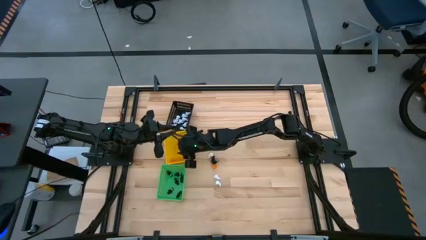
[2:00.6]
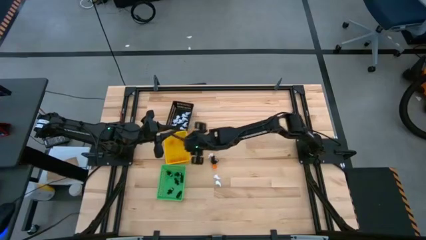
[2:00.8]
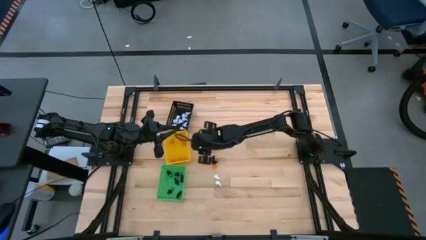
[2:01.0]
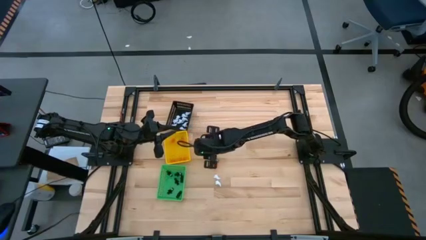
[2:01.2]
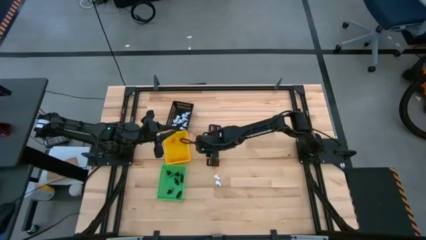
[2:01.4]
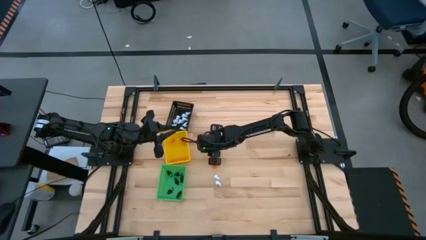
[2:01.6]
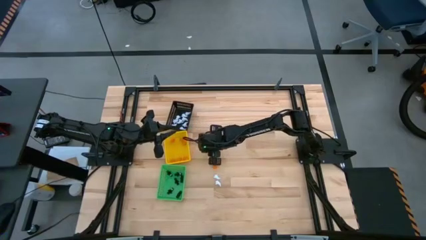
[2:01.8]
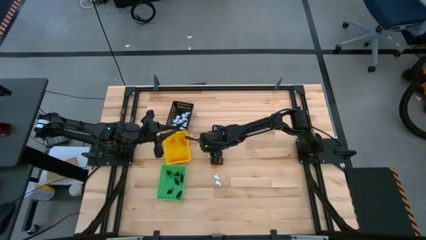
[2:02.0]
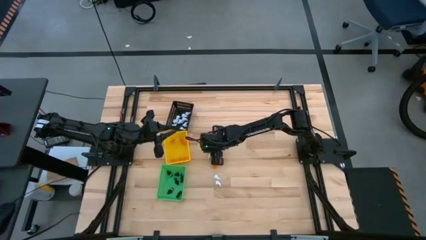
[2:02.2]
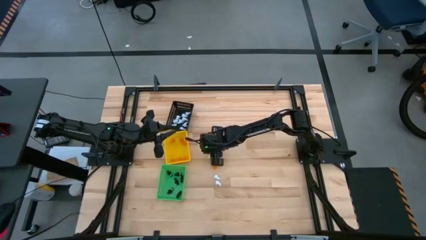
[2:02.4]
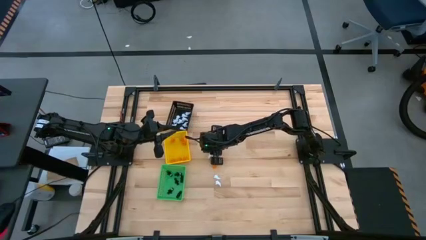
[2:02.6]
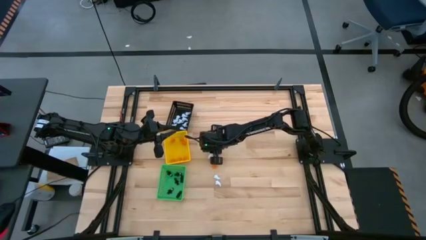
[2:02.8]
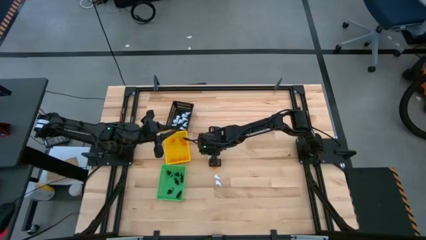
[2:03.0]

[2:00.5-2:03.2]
Task: Sort Halloween decoration
Put the orange pumpkin toy into the yellow basket

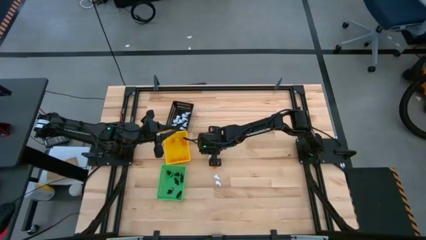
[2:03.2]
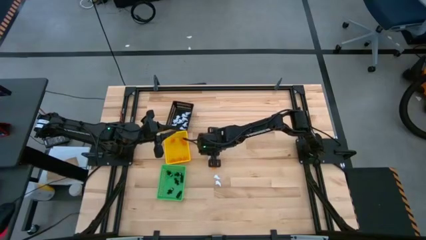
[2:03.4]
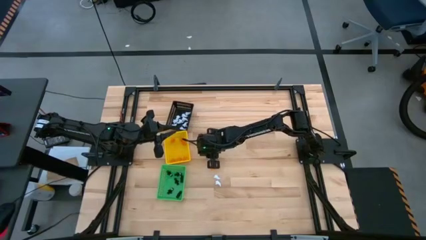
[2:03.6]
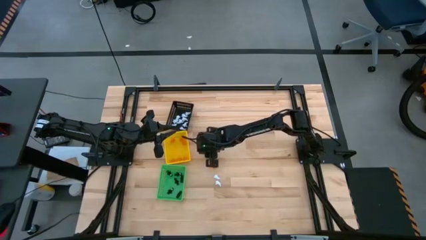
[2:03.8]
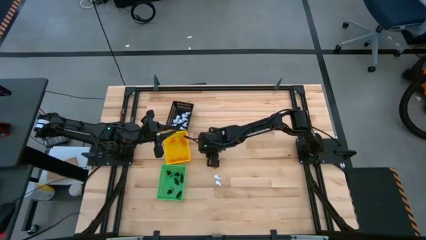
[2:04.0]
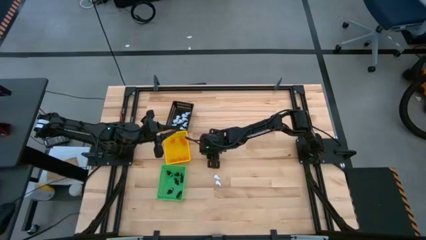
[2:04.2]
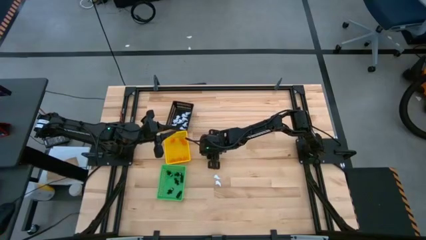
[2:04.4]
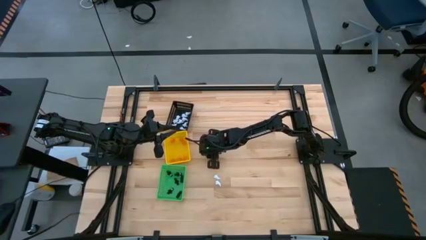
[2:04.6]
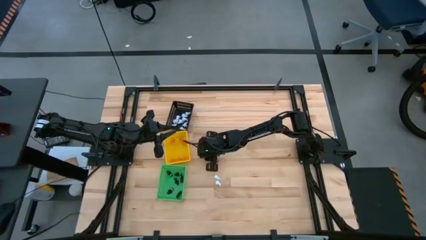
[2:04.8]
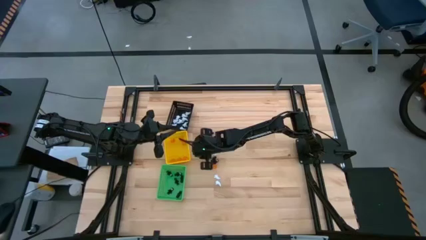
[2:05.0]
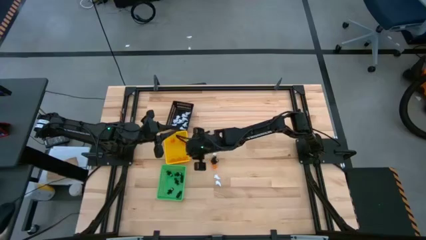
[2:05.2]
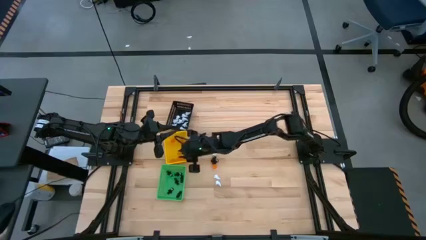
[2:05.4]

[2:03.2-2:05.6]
Put the orange pumpkin toy into the yellow basket

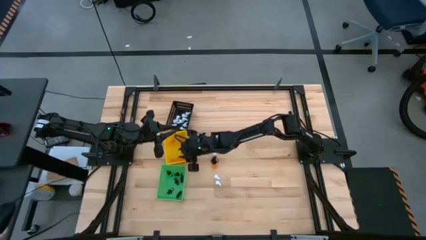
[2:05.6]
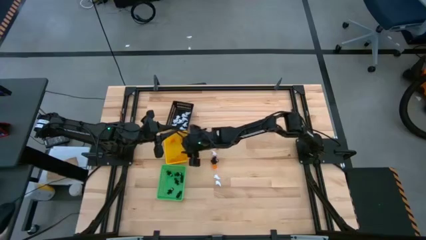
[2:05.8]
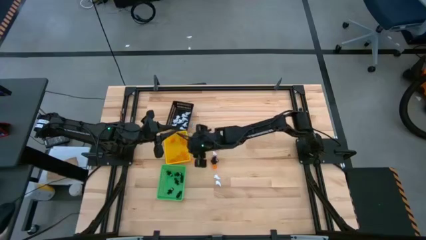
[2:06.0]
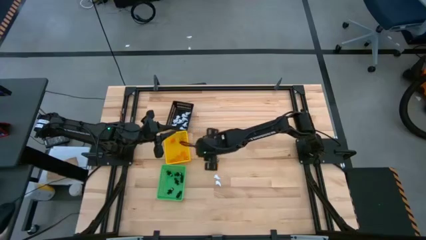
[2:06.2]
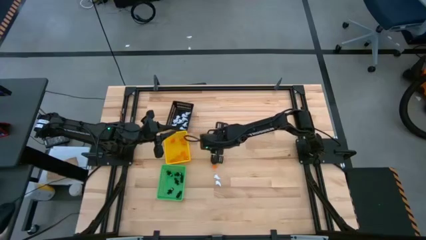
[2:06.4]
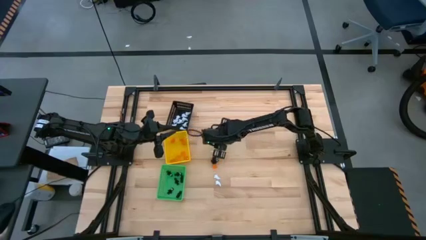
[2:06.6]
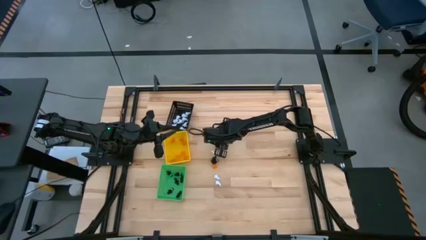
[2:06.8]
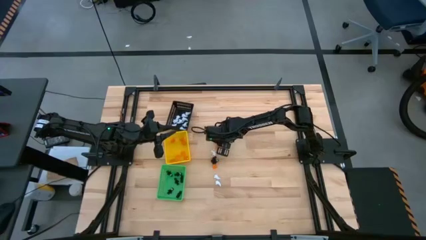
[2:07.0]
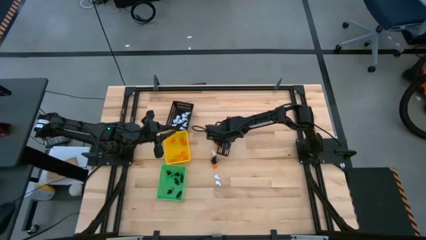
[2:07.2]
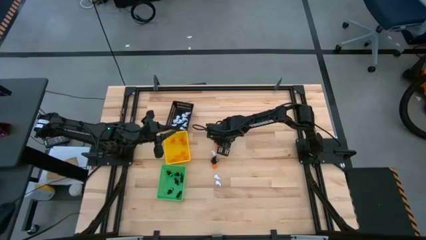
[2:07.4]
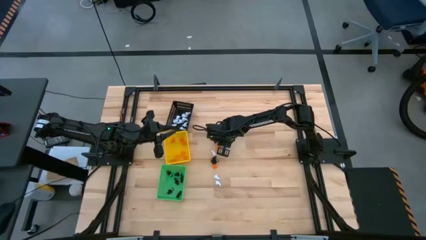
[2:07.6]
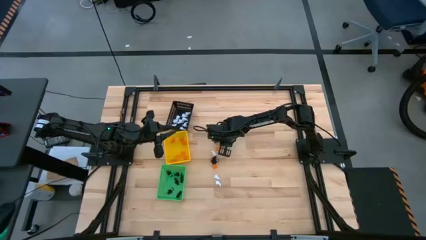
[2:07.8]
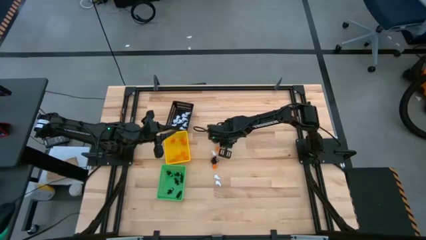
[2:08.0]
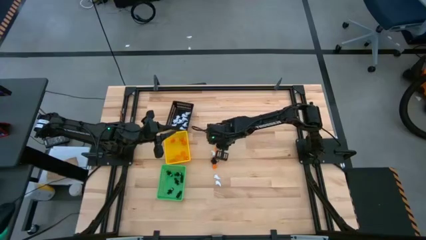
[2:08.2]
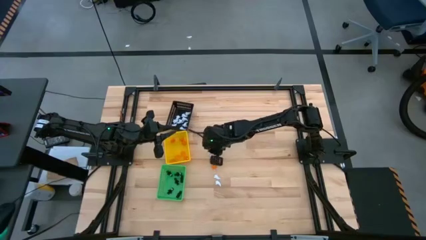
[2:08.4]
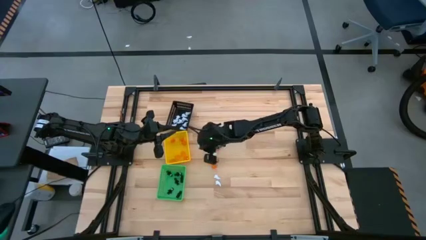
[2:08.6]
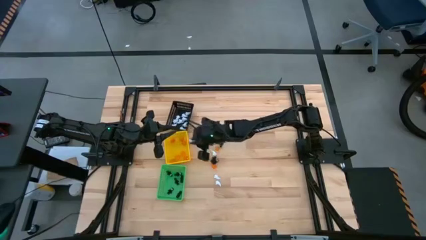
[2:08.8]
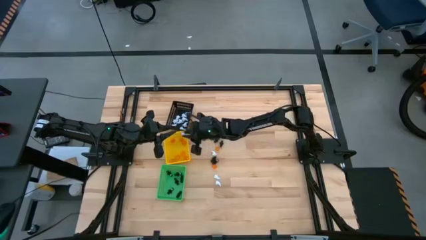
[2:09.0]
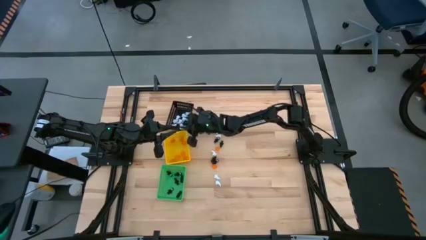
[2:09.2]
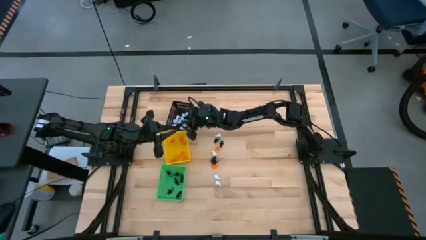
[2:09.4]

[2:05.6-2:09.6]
Put the white ghost plush toy into the black basket

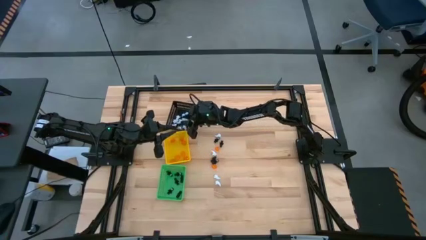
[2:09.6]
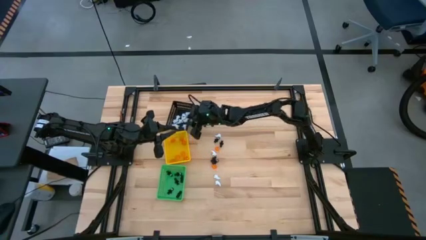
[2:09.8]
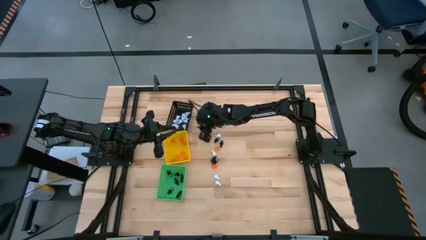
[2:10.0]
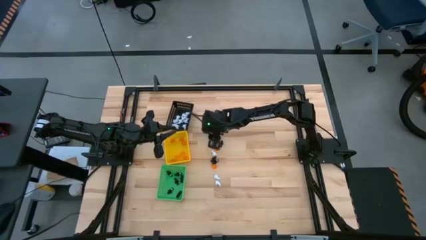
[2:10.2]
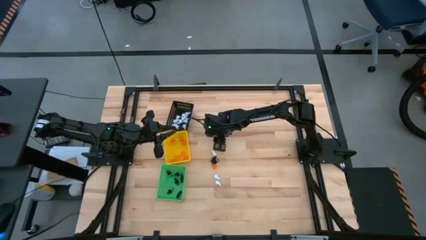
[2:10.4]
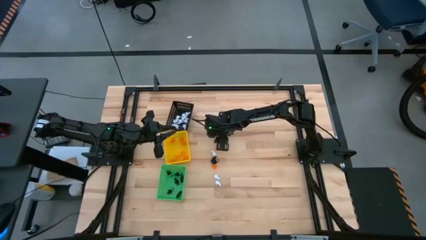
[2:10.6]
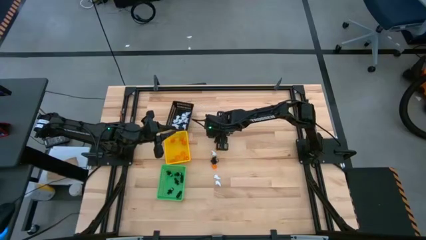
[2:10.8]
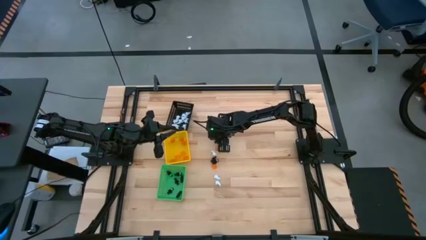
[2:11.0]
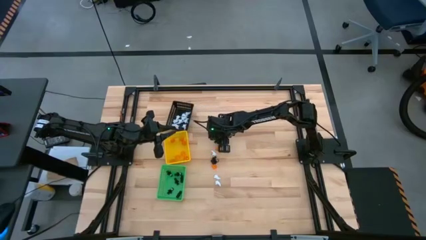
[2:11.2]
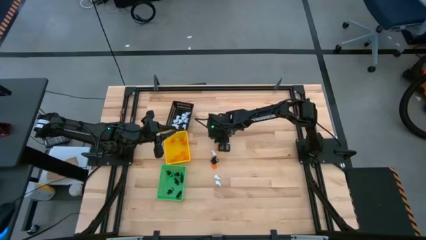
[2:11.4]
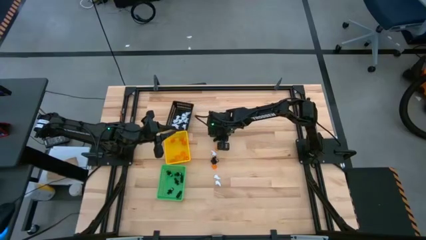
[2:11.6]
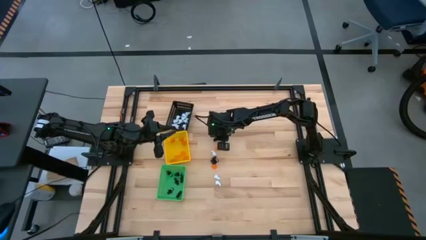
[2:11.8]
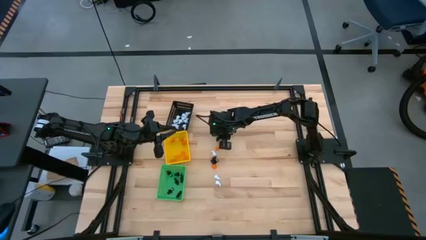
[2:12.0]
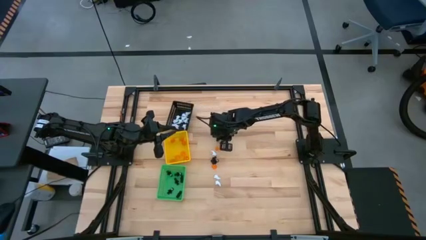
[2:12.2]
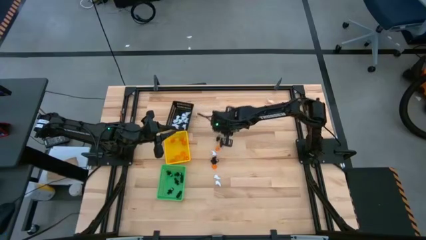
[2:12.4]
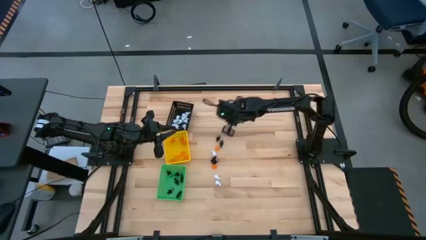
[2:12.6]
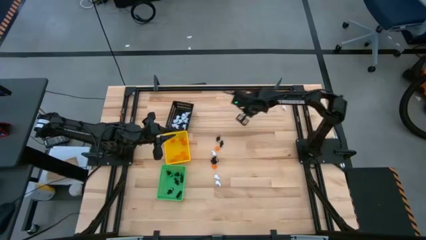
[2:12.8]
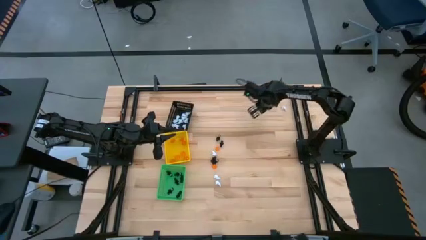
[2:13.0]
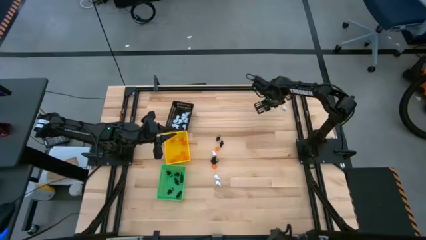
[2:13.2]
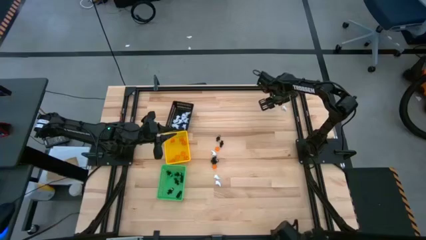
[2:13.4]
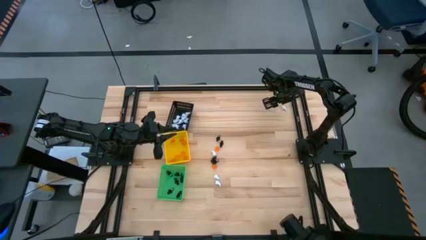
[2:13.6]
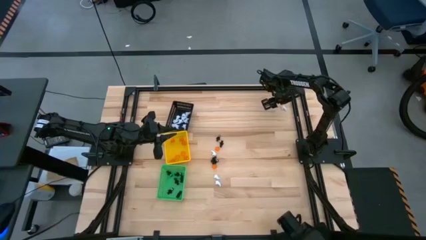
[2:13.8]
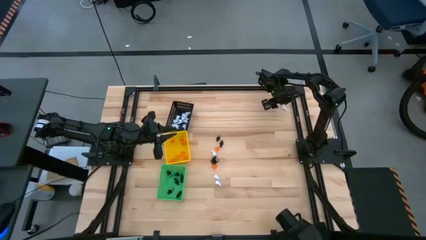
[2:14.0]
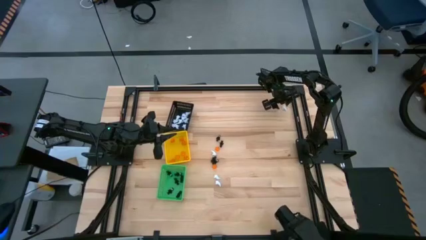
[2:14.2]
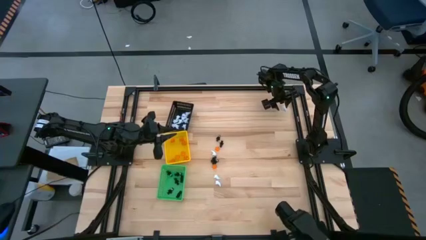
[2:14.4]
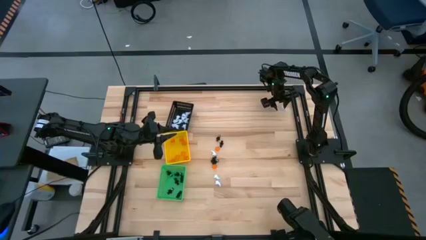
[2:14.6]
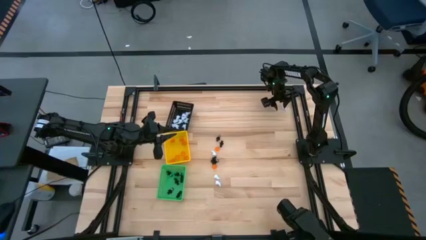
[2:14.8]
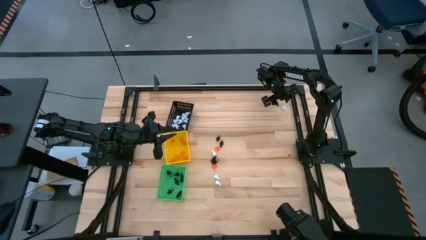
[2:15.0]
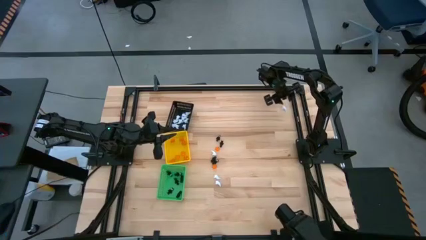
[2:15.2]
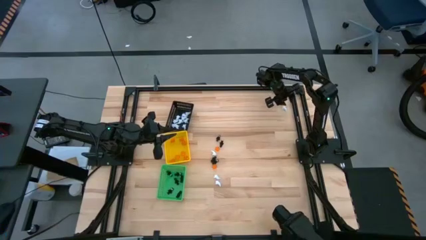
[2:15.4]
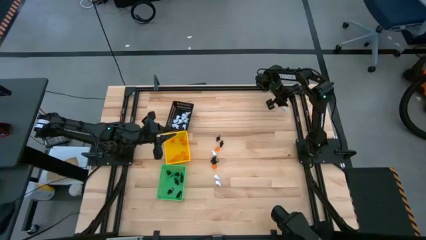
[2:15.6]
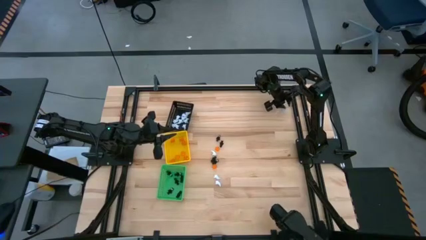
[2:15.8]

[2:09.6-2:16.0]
Put the white ghost plush toy into the black basket
